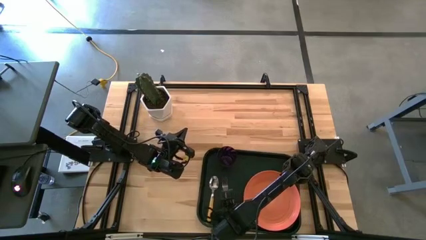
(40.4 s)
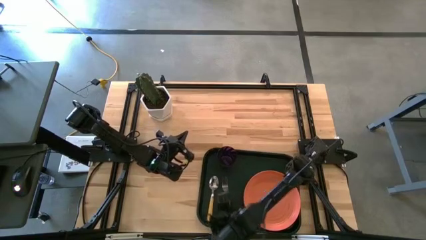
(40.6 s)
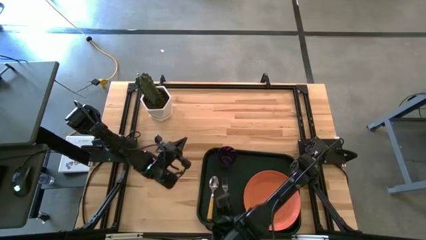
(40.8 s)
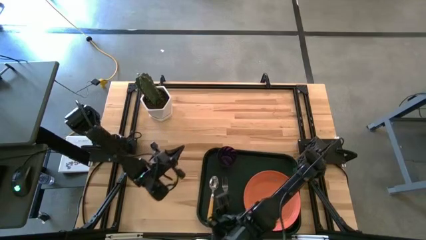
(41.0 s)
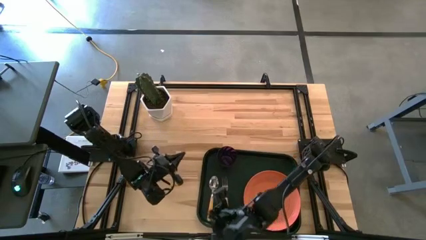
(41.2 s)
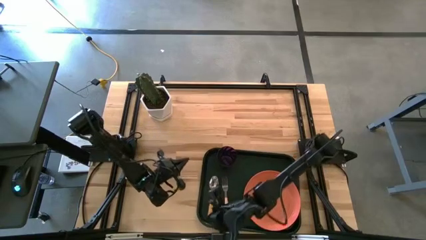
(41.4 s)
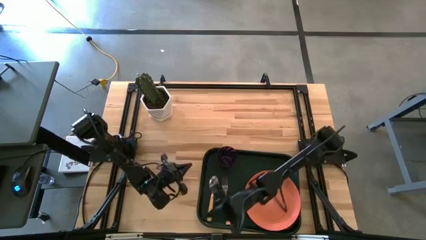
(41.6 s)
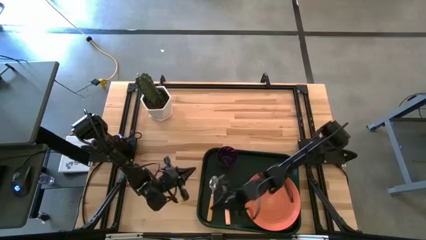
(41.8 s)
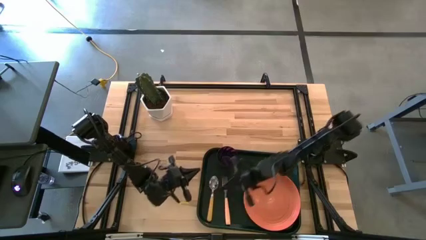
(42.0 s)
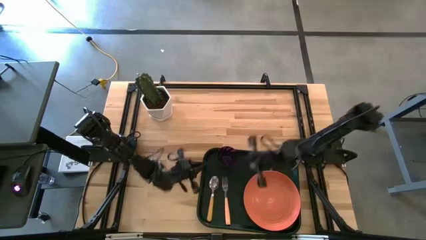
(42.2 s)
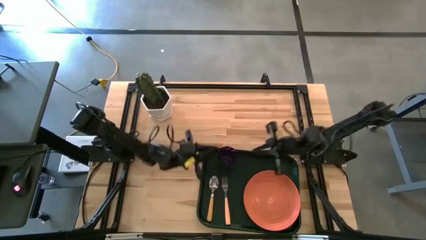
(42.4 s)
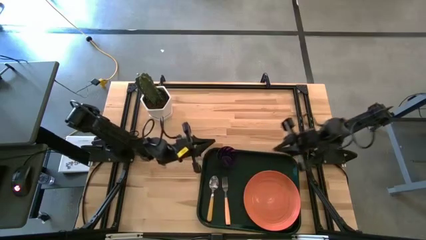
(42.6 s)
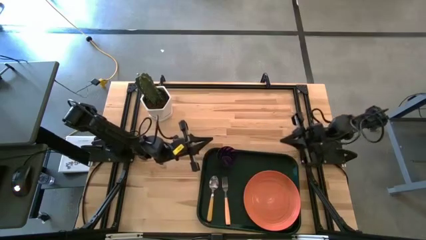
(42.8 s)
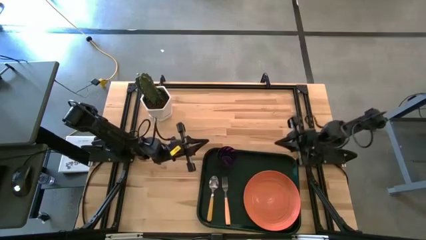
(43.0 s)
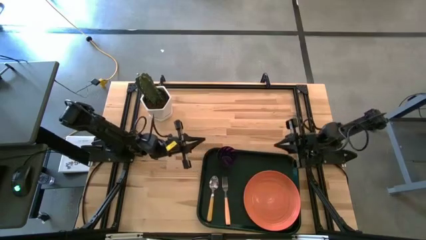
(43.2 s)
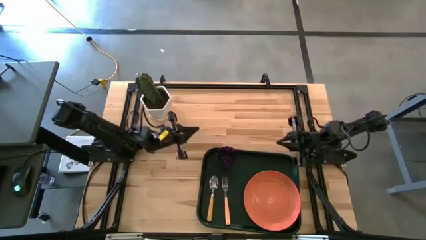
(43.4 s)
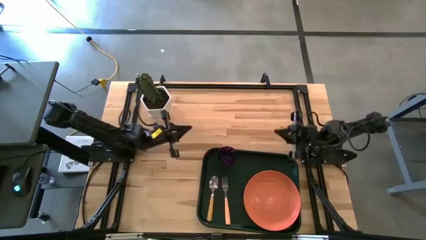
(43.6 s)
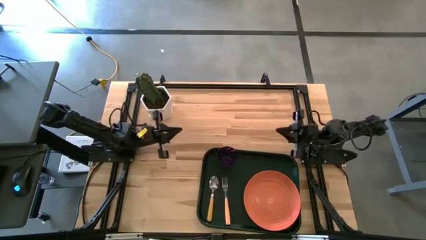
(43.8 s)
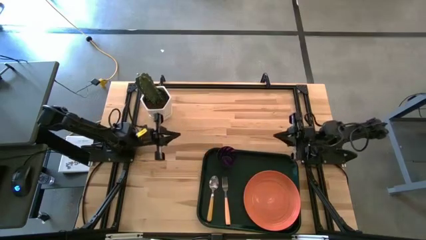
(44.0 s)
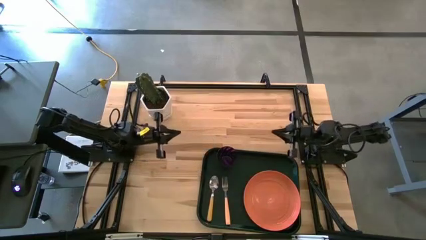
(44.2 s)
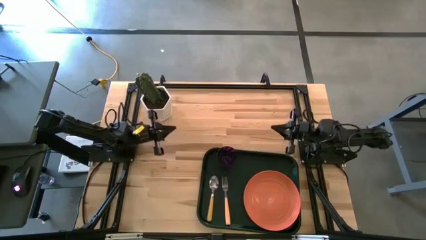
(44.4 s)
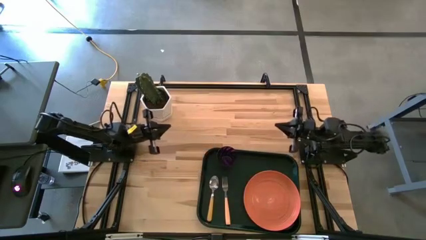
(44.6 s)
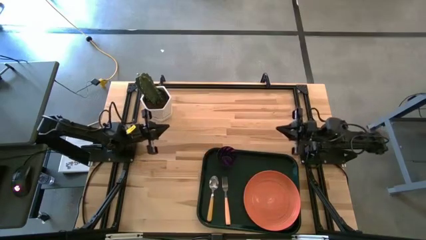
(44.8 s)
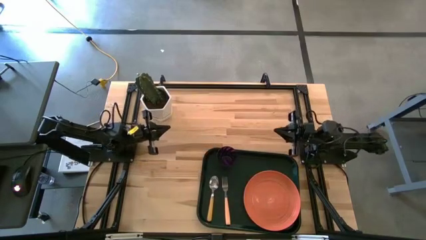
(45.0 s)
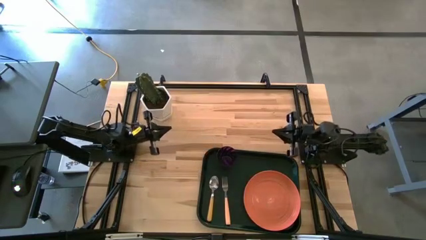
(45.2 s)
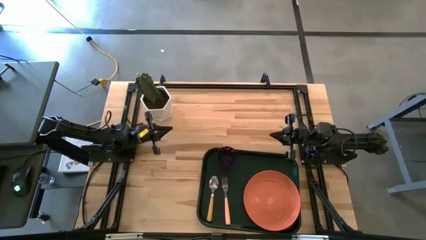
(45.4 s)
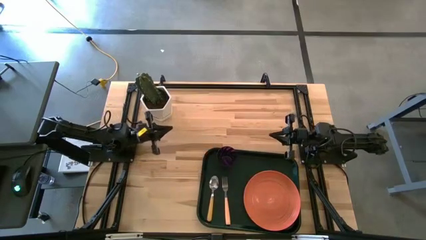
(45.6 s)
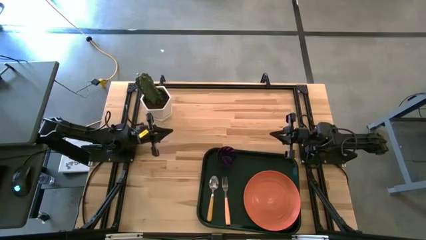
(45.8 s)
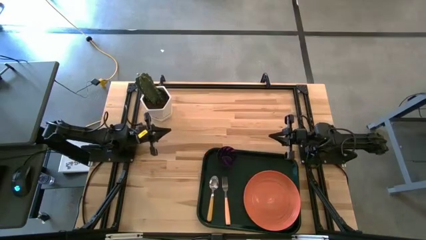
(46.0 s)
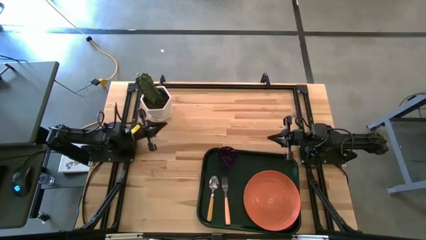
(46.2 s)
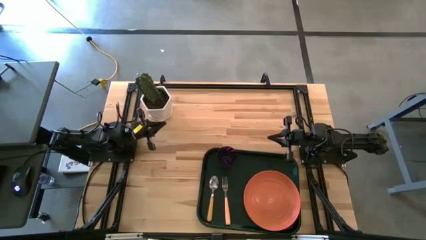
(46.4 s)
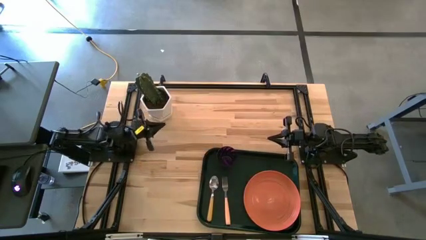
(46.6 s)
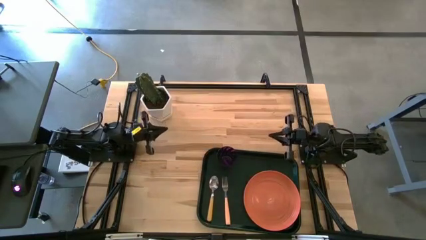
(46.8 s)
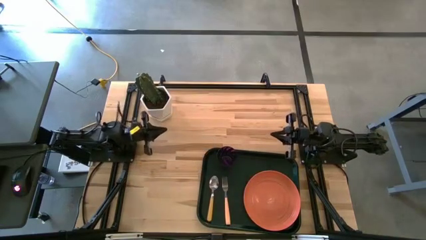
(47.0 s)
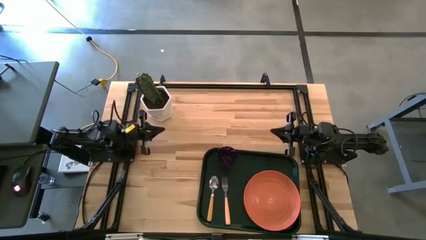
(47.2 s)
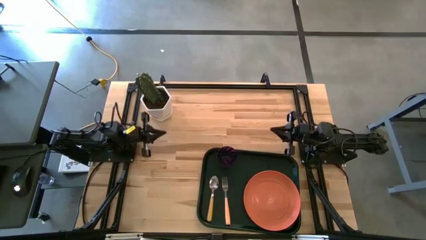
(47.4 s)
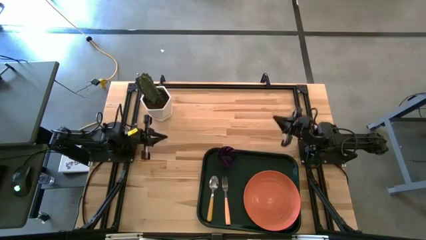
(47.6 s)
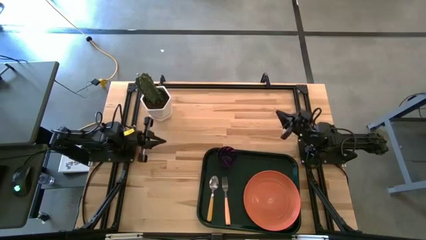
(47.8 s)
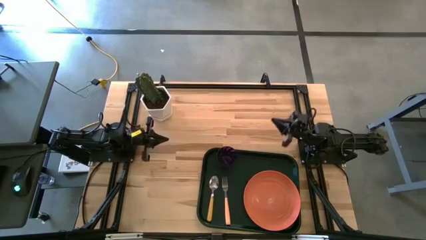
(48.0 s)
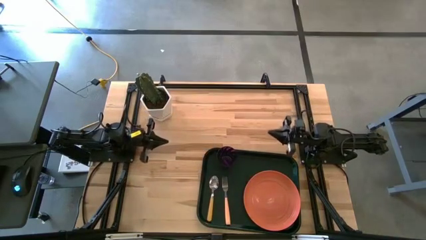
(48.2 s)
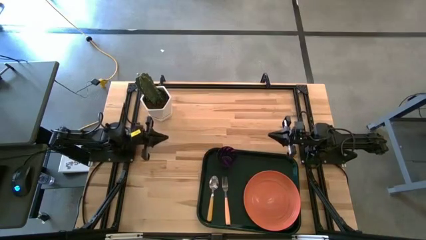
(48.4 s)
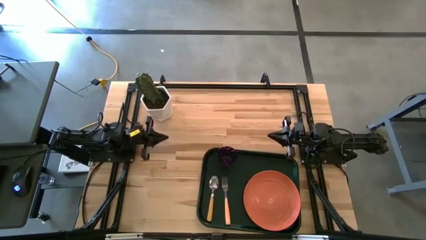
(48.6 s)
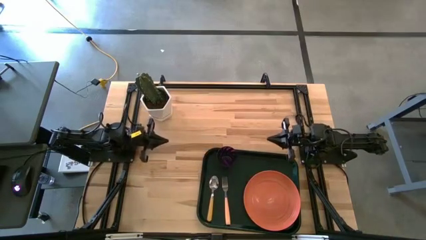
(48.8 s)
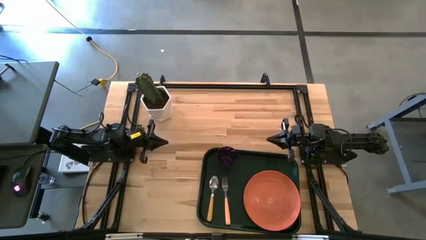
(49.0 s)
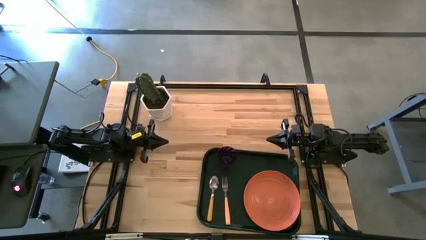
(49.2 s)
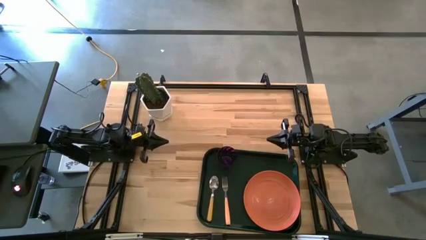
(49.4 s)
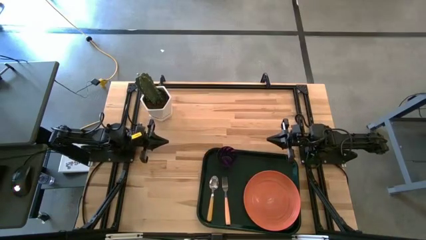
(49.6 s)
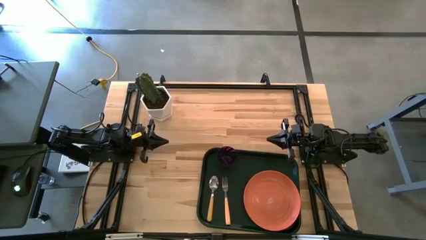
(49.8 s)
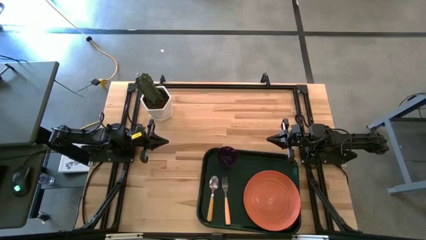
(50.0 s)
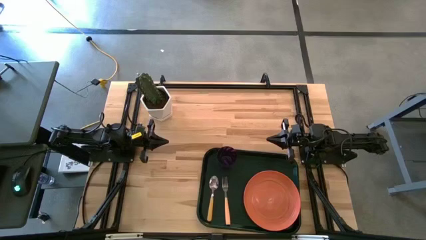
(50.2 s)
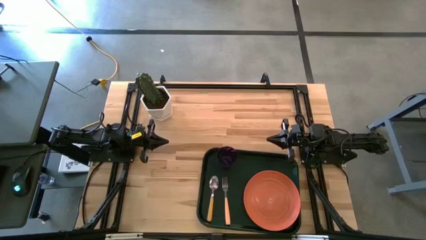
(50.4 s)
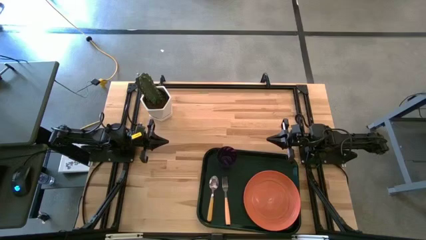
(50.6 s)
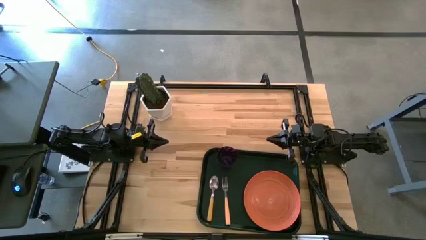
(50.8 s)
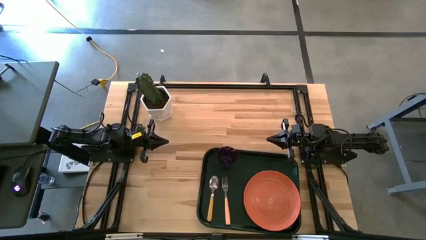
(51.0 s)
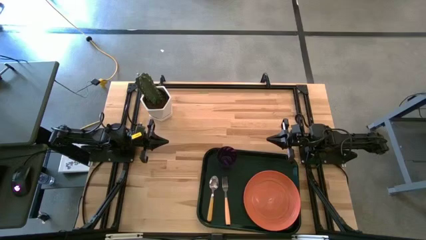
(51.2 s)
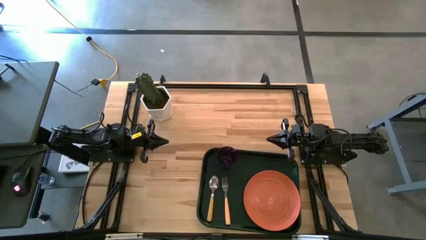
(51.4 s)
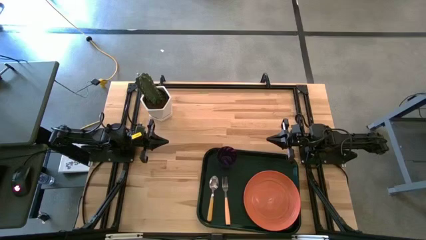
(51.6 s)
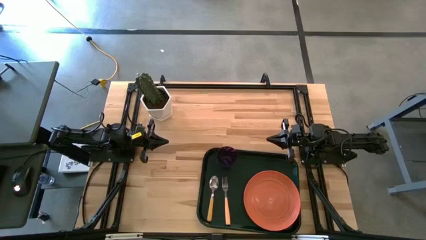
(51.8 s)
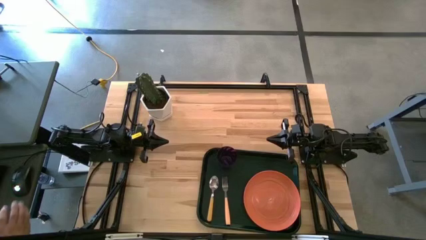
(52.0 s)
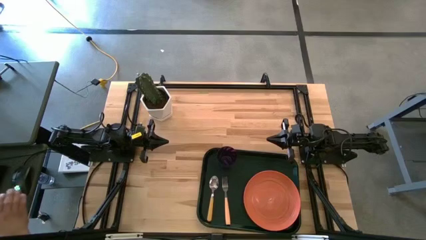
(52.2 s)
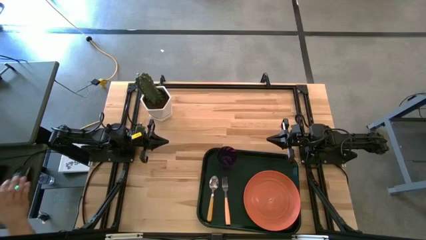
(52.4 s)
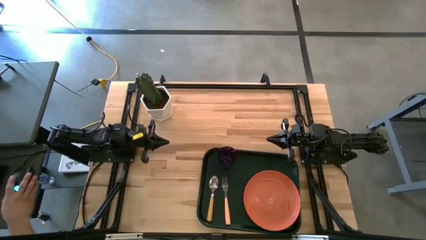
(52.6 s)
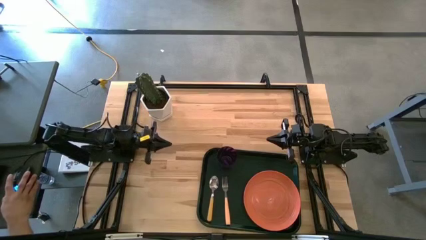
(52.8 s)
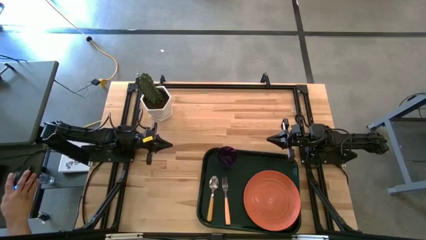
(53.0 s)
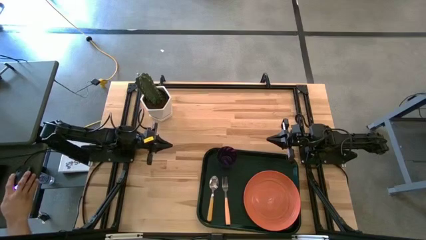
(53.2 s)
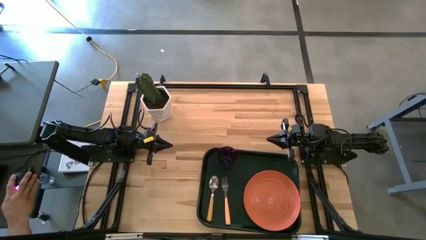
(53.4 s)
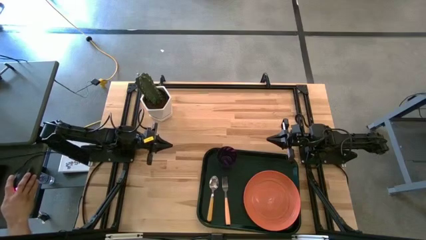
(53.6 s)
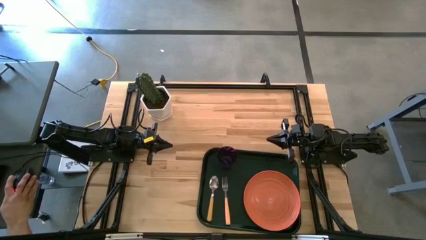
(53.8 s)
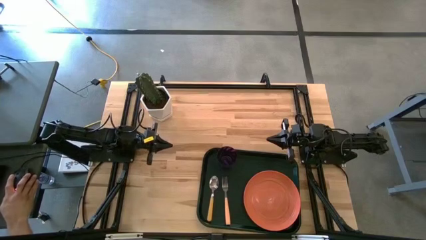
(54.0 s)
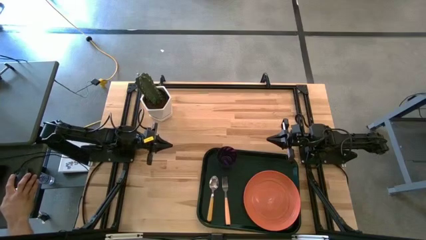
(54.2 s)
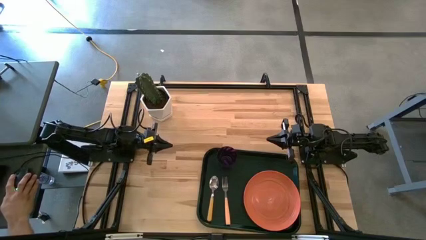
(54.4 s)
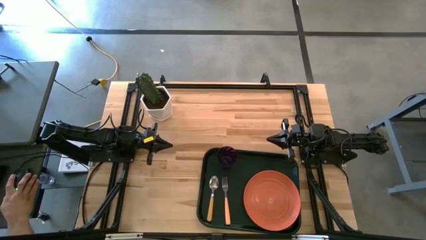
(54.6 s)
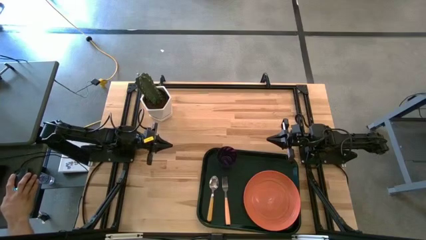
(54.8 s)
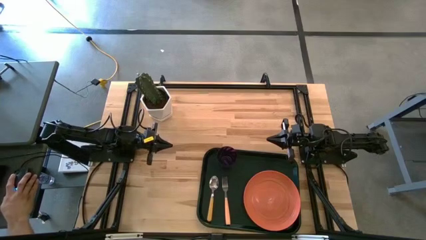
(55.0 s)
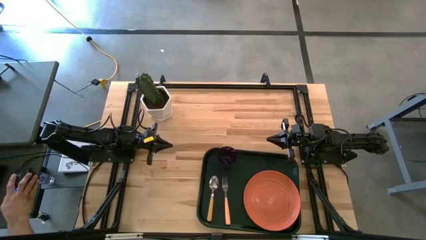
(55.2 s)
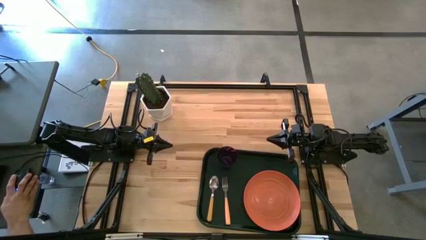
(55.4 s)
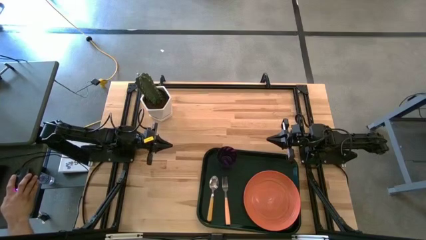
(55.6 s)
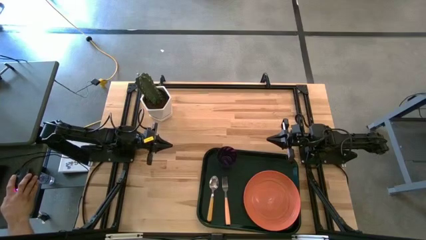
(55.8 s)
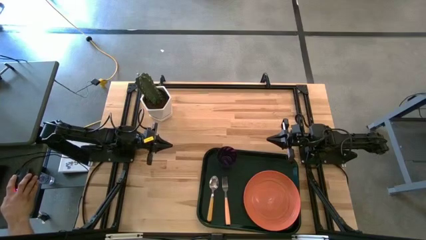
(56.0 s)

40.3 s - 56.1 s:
Task: Pick and place plate/cup/fork/spoon on tray
Return to Home Position
